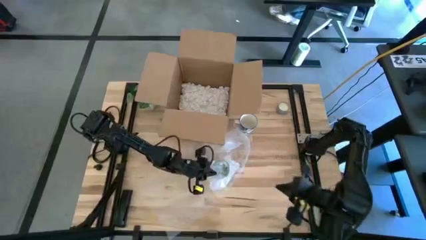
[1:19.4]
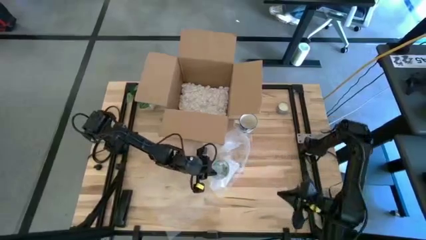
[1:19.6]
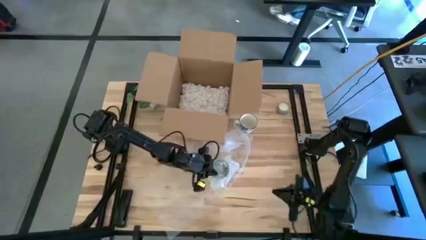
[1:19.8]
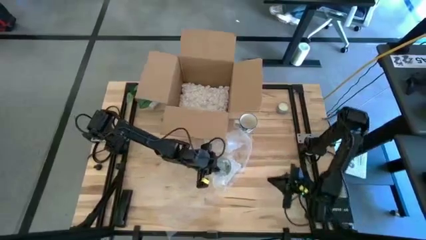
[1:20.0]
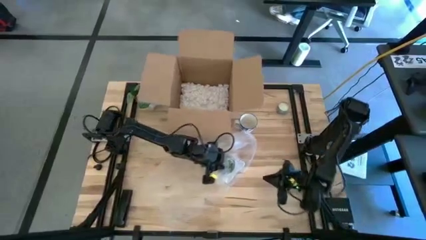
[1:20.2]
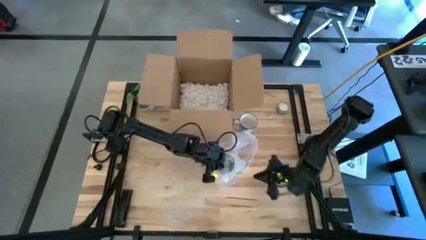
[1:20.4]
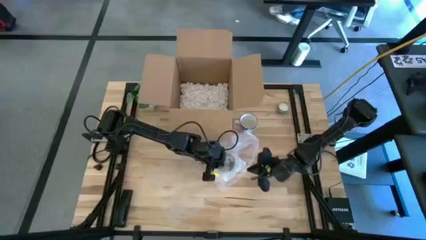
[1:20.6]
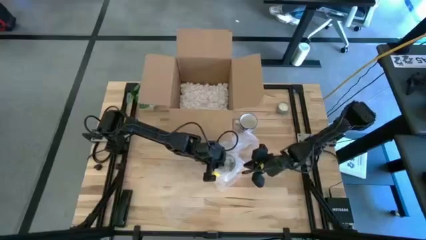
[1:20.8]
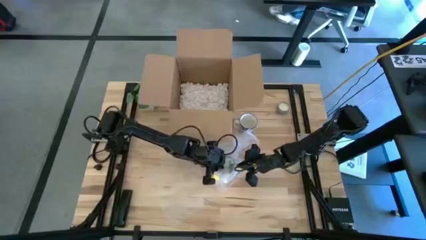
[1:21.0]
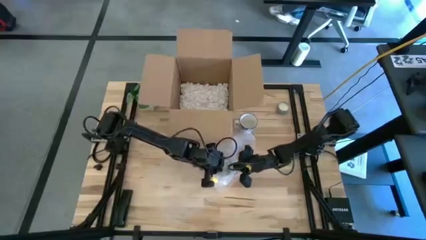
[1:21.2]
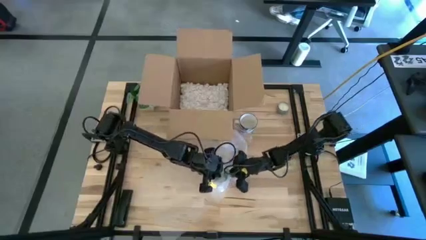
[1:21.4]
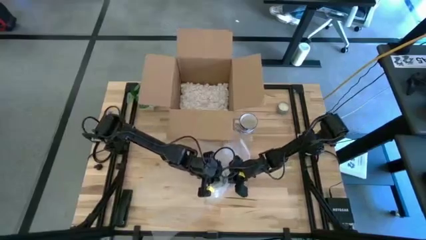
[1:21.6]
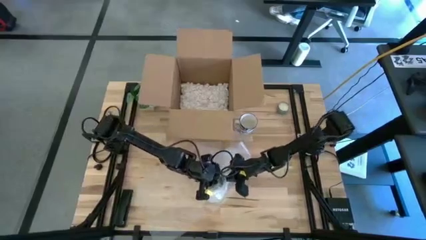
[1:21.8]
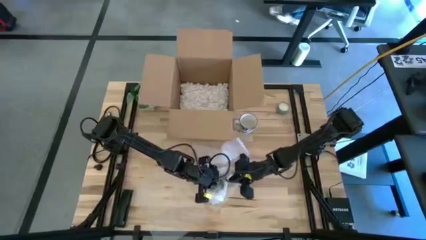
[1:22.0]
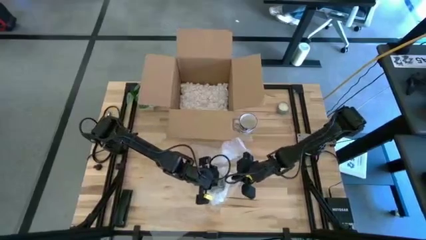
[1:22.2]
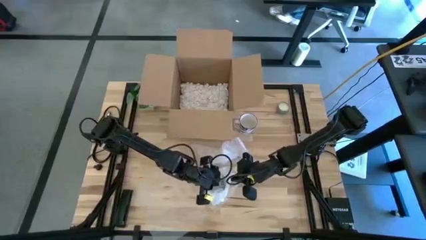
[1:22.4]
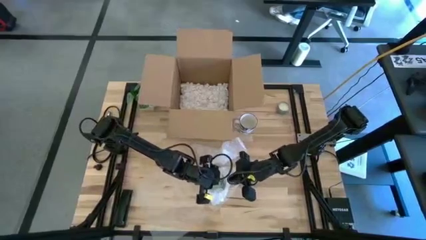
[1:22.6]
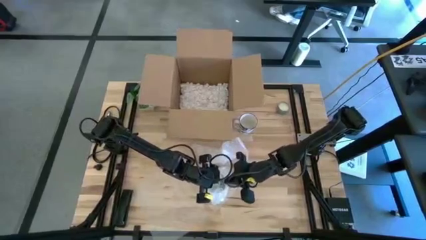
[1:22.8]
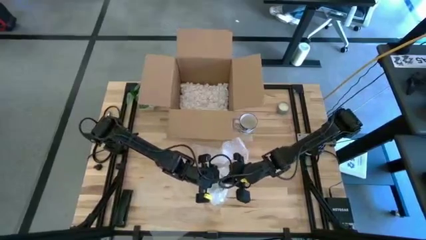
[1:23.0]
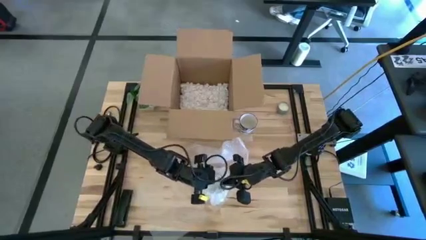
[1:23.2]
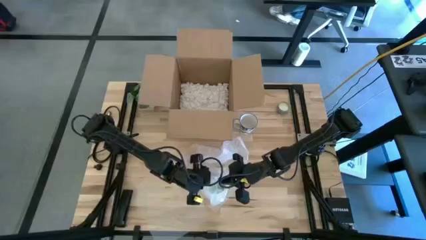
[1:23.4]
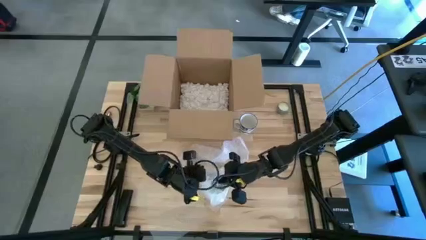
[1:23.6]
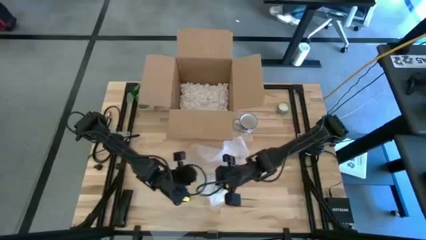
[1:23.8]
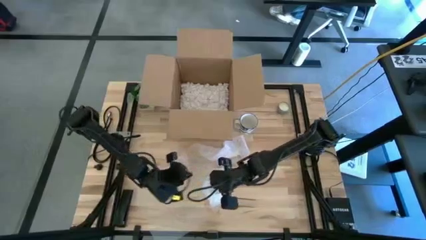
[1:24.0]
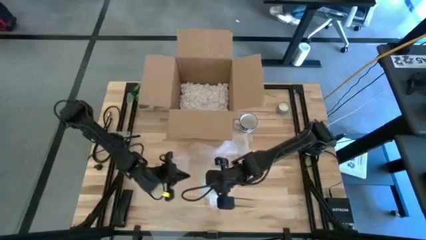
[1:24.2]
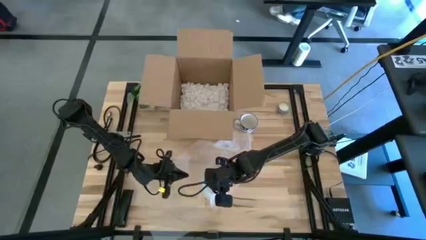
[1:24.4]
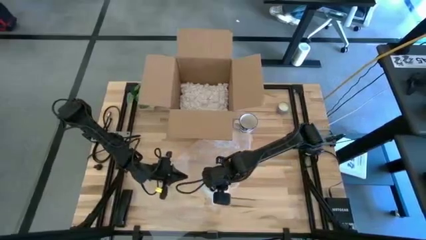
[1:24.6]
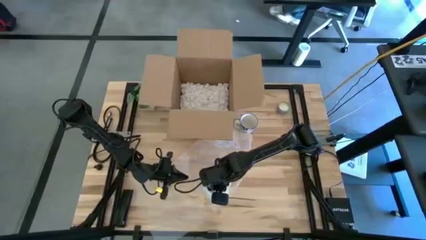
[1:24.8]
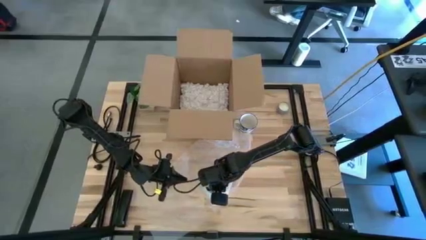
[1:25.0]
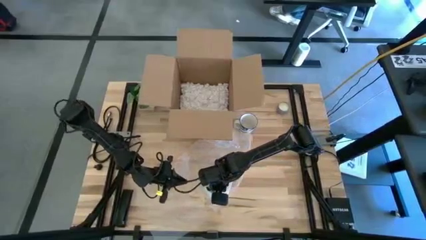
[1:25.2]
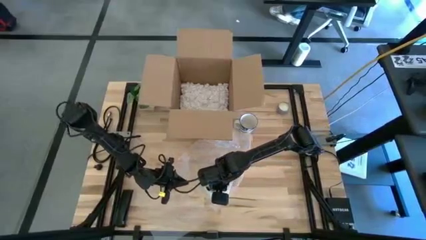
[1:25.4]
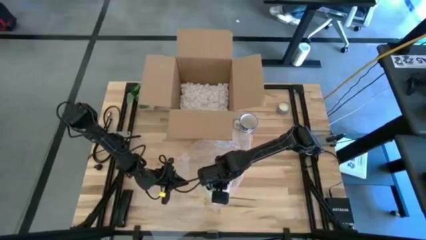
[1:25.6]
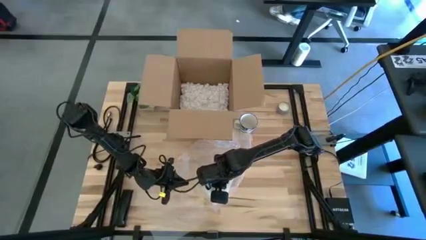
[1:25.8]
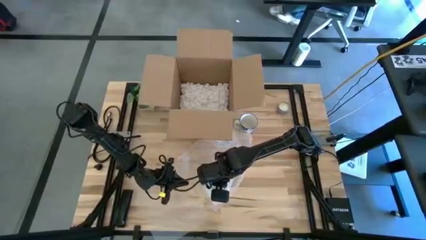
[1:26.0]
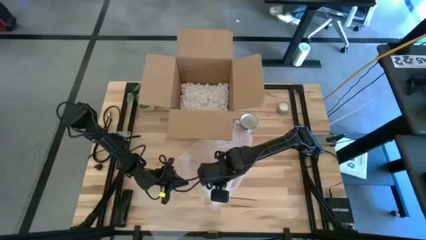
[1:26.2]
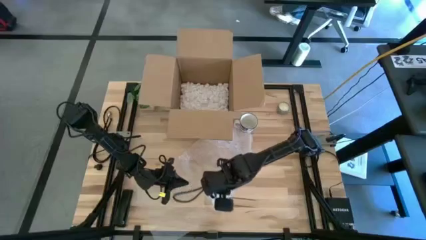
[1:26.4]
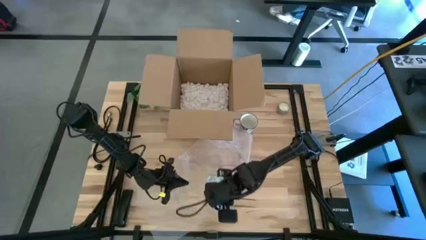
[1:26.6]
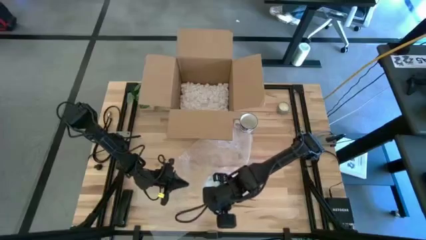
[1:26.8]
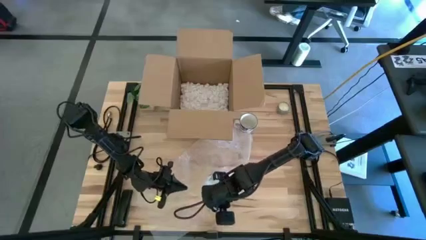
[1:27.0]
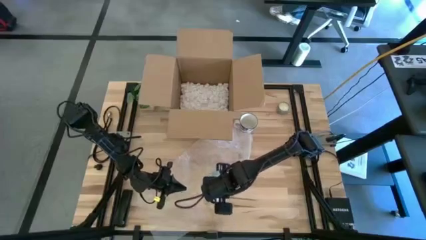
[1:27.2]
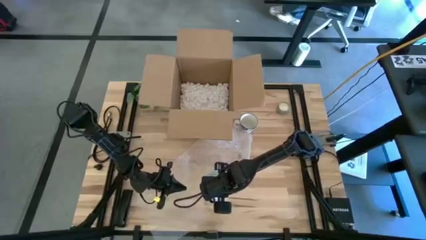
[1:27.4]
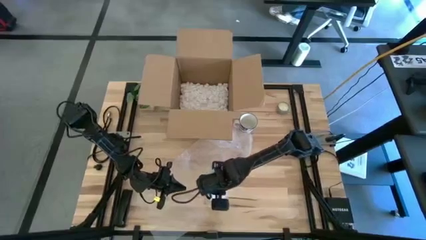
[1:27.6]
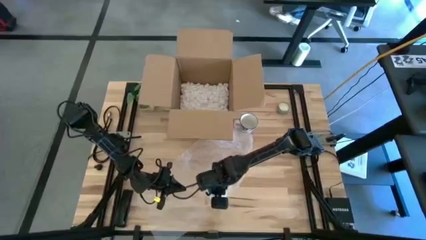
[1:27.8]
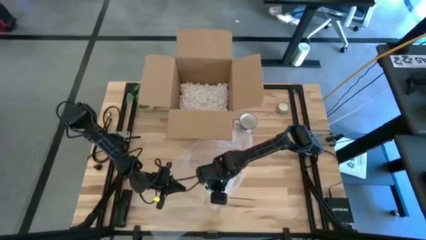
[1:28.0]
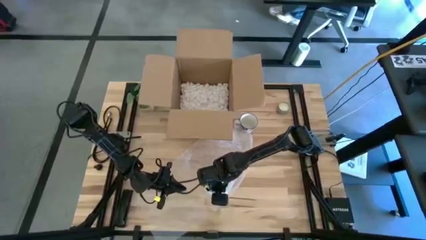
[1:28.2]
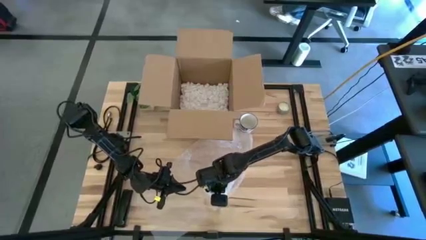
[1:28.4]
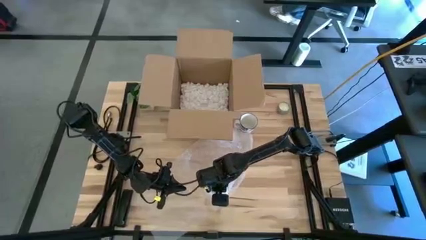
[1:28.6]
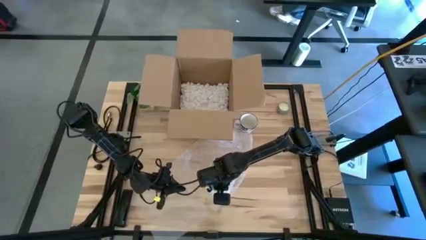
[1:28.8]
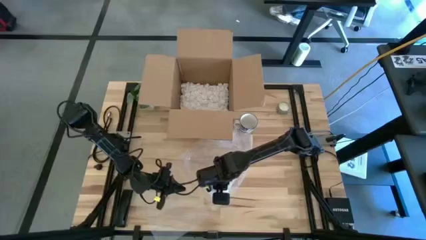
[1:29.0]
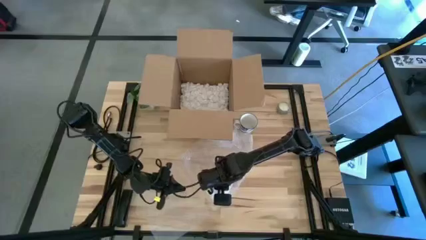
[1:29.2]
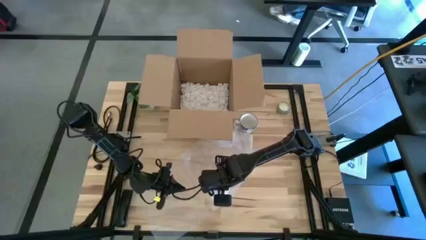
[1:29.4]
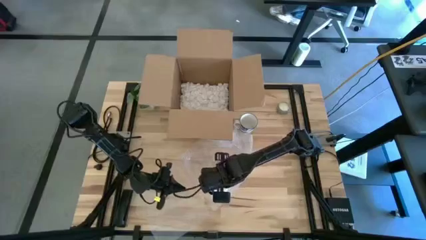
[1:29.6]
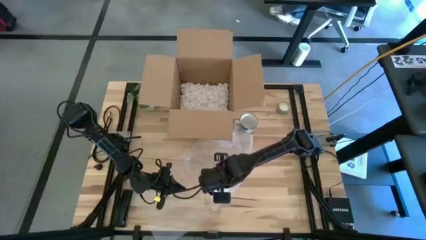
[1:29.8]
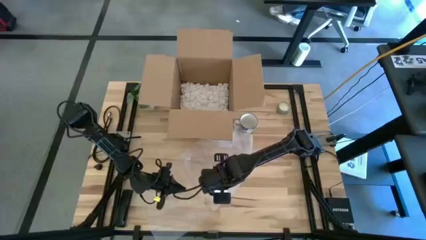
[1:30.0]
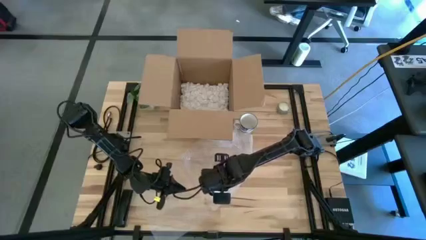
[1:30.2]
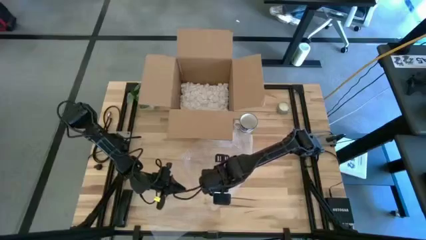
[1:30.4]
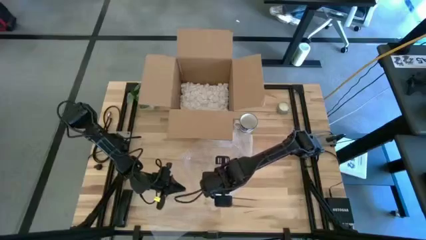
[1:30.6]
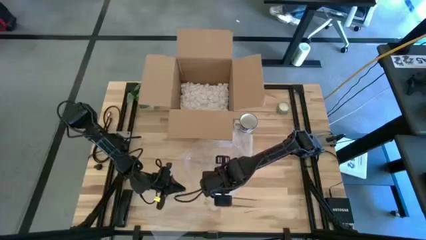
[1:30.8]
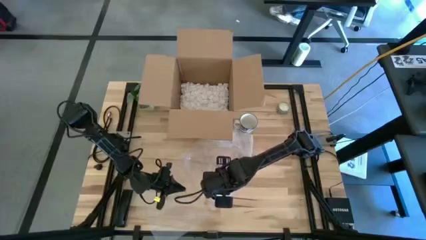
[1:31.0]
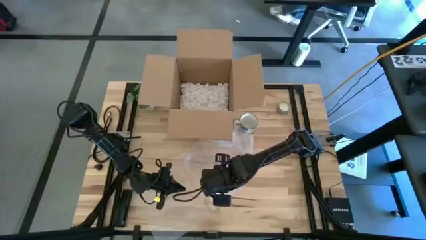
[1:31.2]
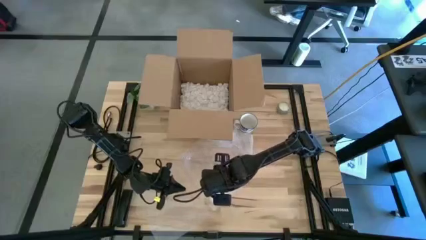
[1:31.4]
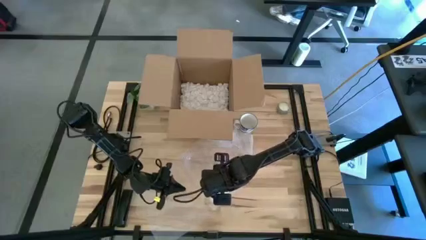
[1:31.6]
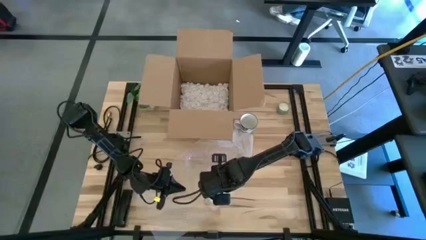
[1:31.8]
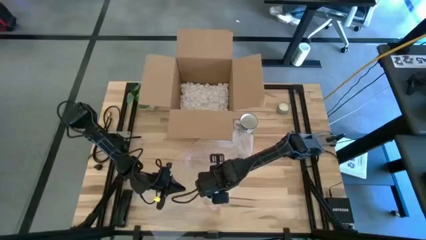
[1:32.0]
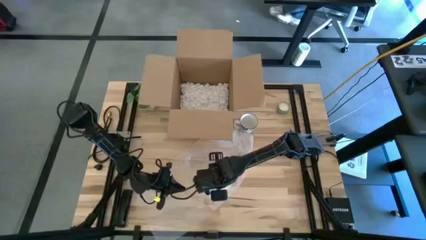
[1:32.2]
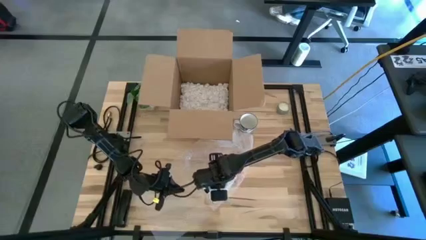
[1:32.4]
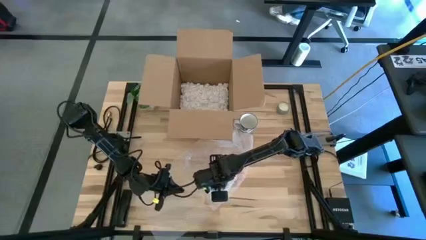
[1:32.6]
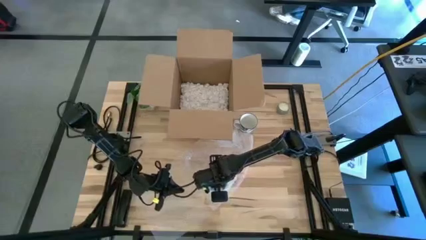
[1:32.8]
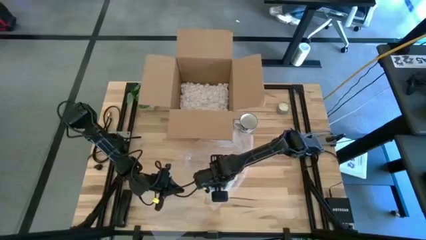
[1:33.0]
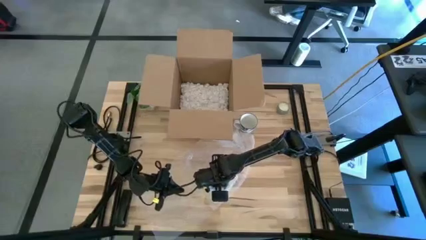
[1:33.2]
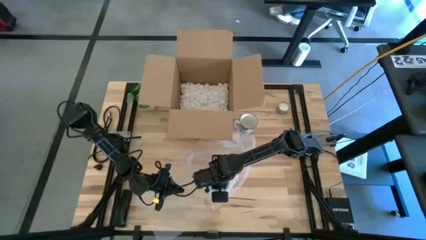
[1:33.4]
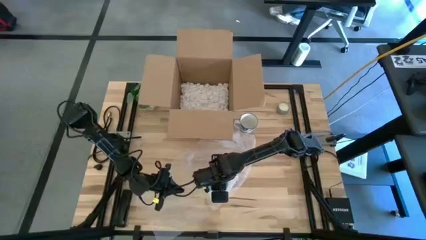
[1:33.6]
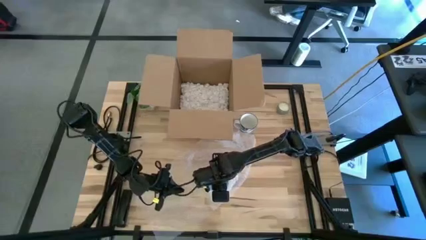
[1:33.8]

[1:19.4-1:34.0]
Task: wrap mug
Wrap the green mug with the bubble wrap

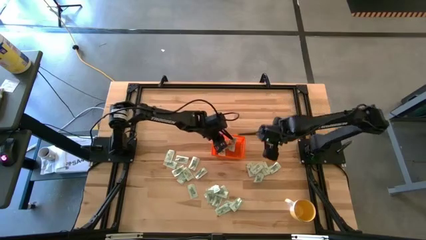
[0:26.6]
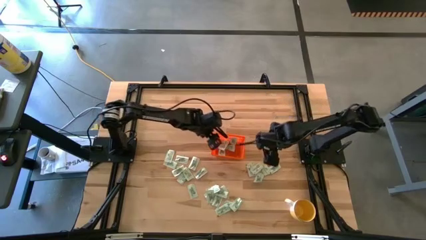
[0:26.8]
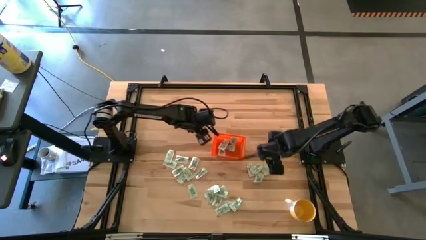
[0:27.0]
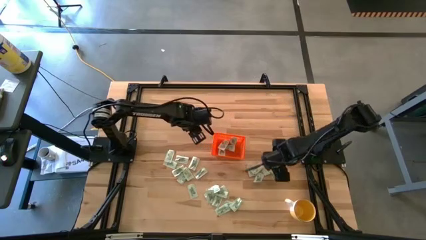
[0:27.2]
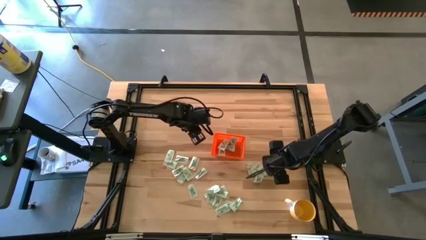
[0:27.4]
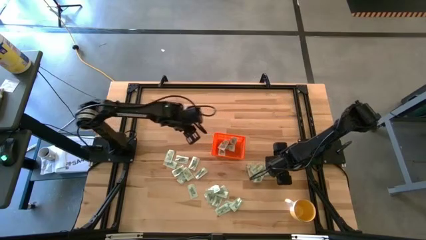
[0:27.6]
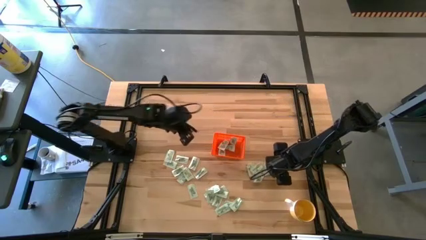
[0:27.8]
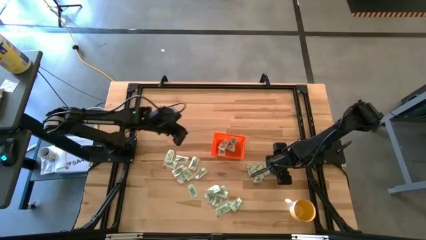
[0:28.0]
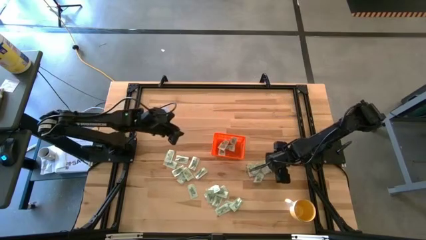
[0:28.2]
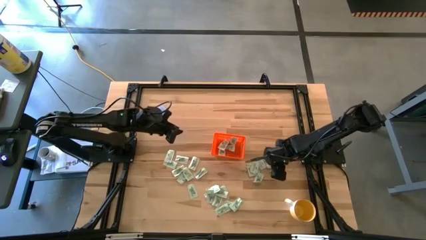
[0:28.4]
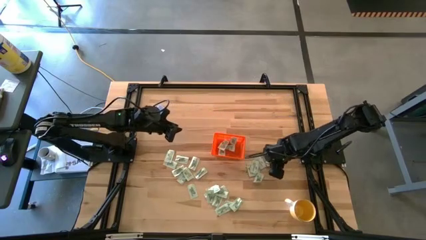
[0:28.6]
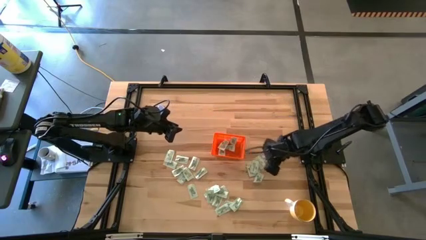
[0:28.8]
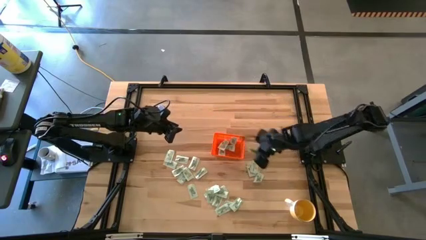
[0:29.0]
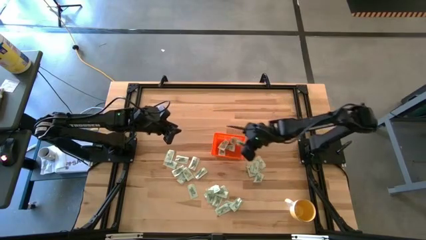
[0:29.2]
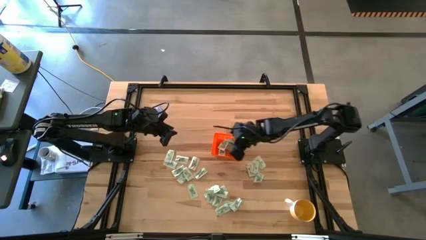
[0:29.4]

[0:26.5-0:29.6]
Task: Pick and place Stevia / Truvia into bins
Put the white stevia packet into the orange bin

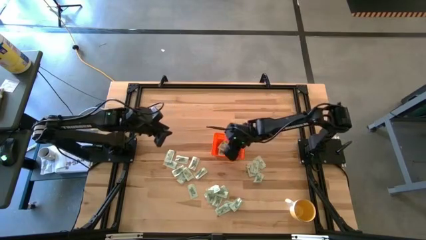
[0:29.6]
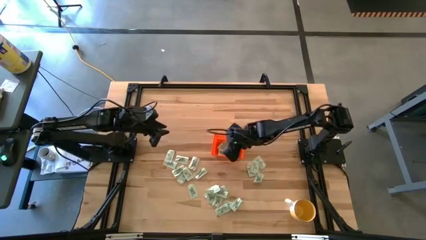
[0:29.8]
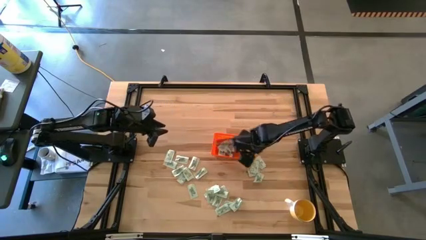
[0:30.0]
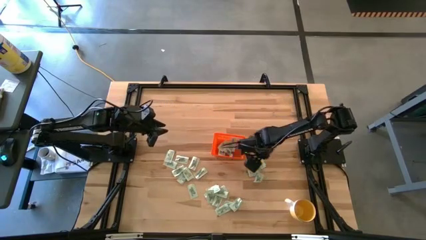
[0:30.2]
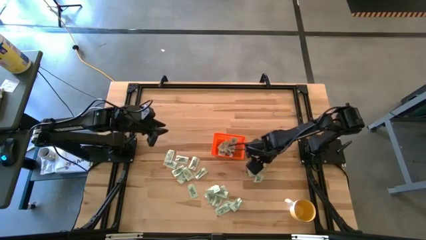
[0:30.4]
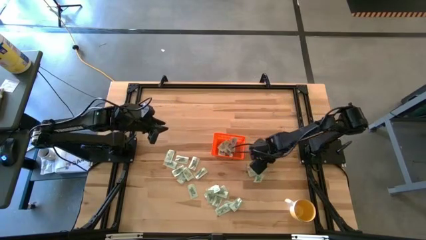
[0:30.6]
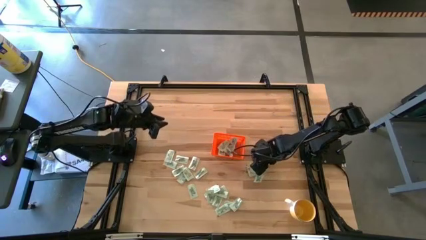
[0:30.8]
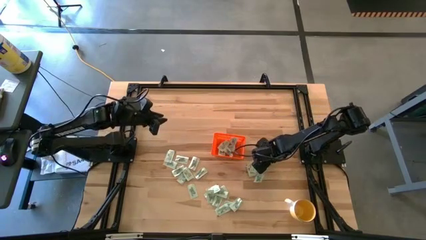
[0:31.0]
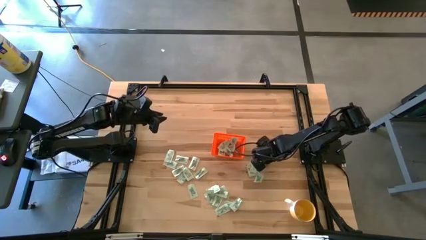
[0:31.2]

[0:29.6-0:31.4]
Put the white stevia packet into the orange bin
